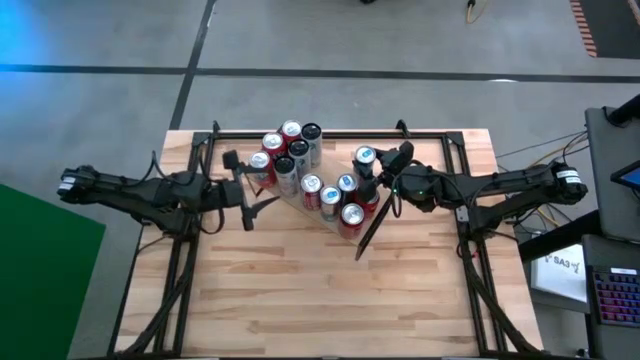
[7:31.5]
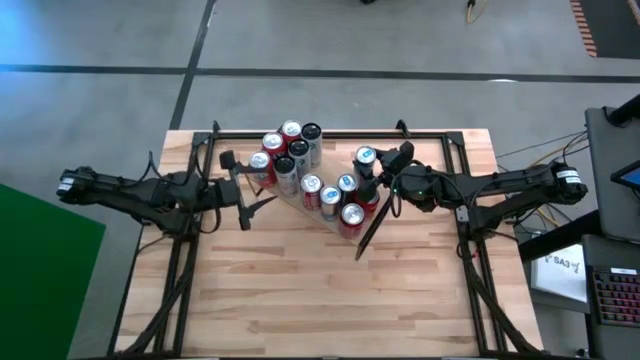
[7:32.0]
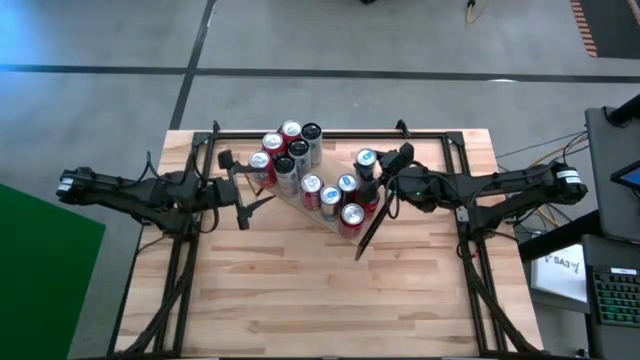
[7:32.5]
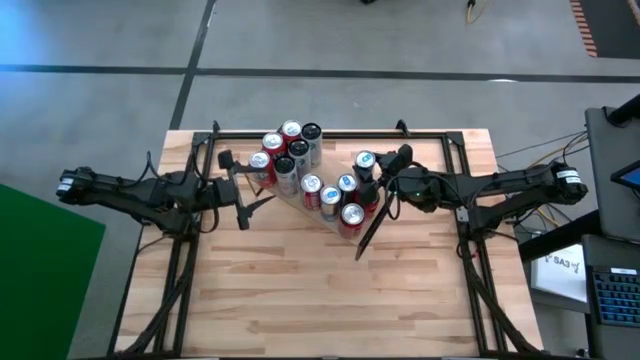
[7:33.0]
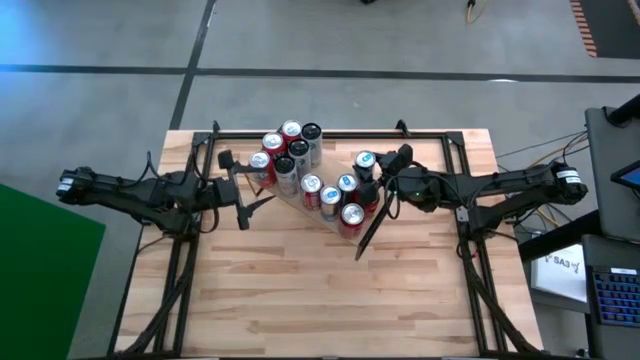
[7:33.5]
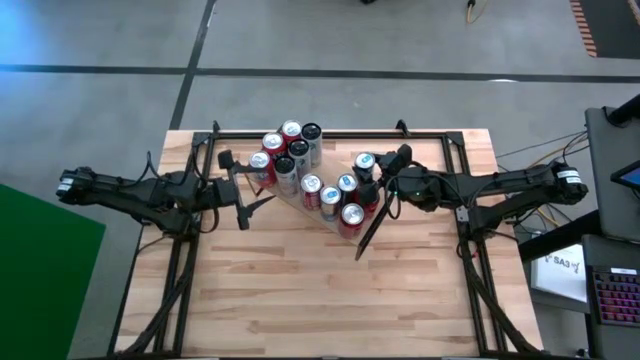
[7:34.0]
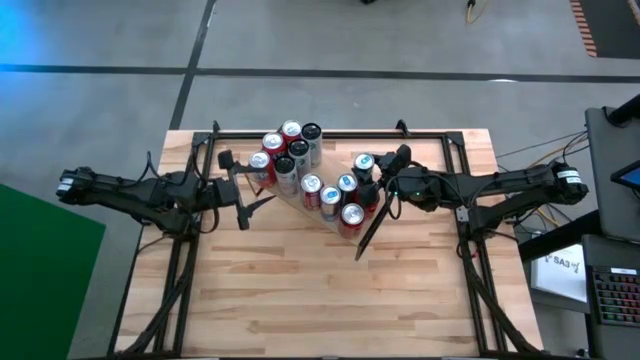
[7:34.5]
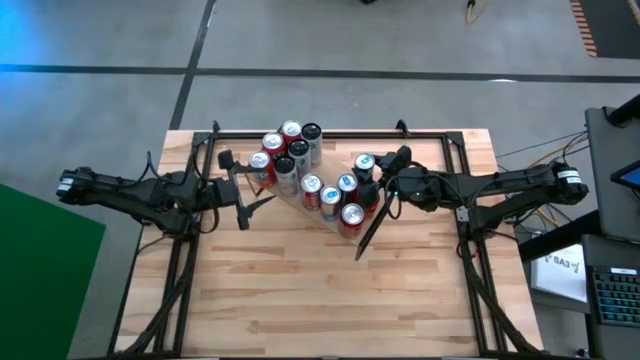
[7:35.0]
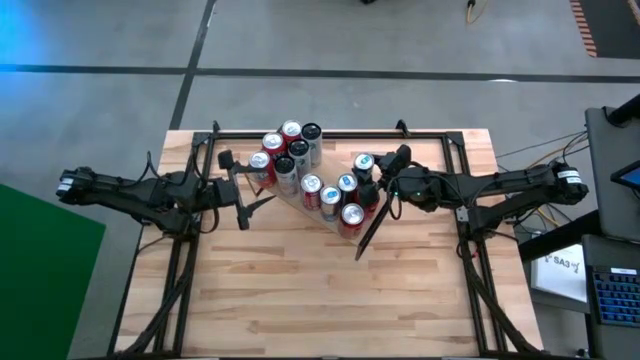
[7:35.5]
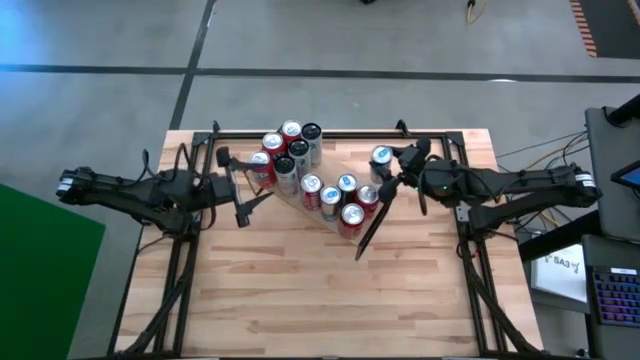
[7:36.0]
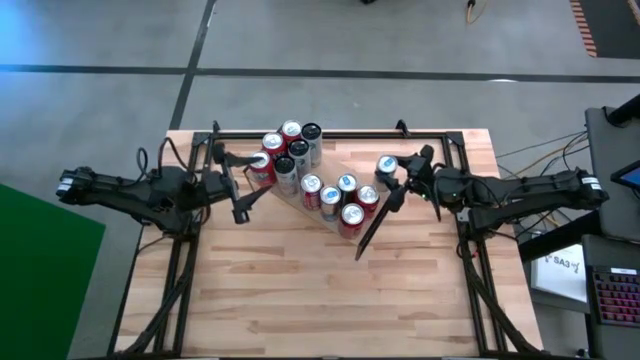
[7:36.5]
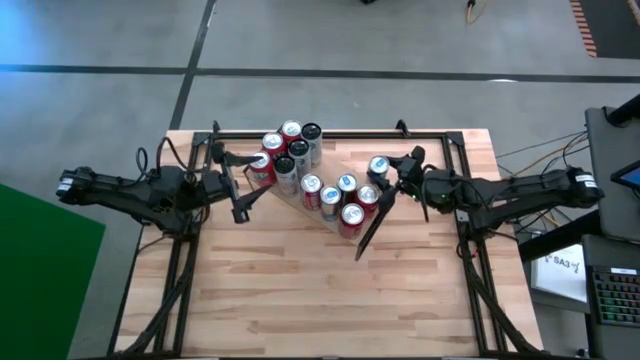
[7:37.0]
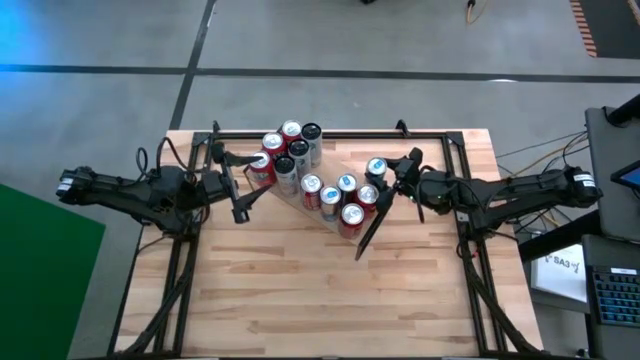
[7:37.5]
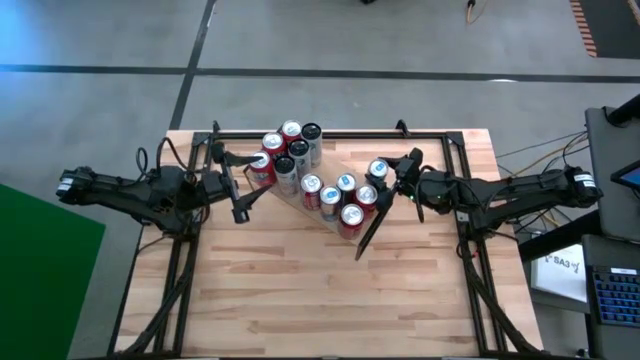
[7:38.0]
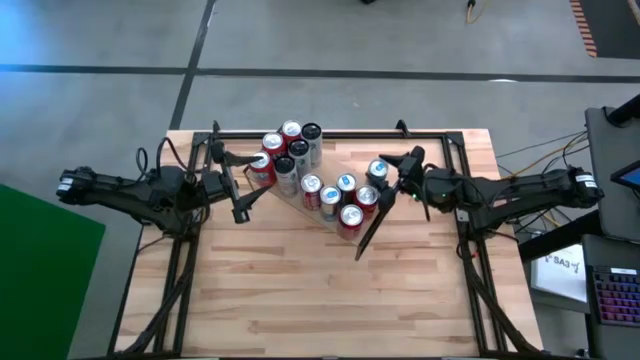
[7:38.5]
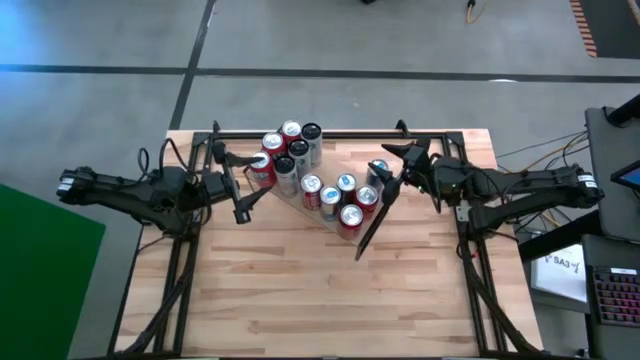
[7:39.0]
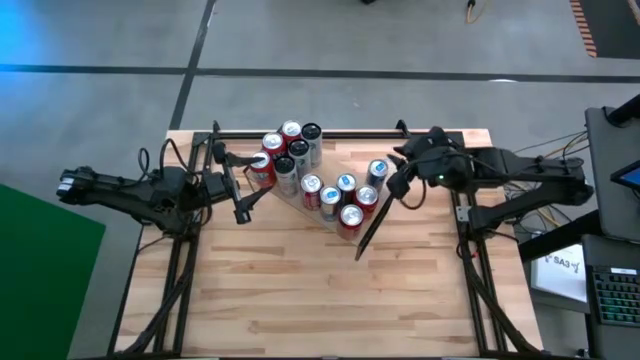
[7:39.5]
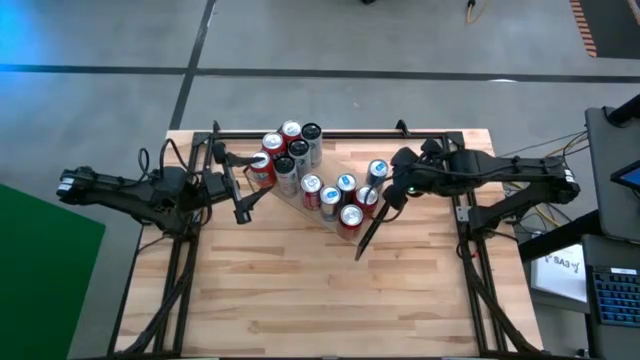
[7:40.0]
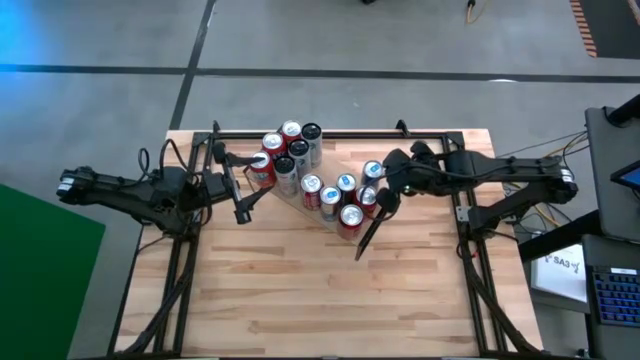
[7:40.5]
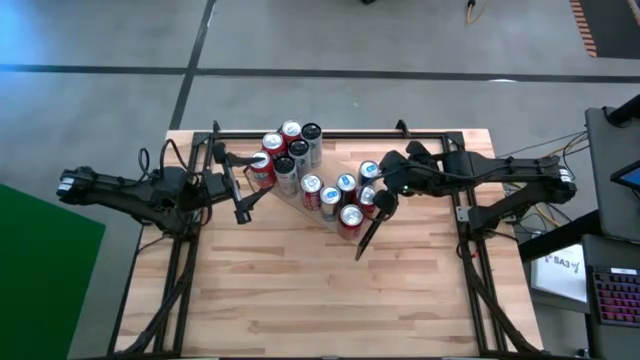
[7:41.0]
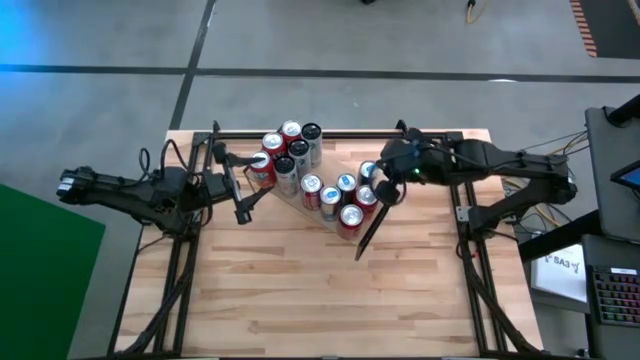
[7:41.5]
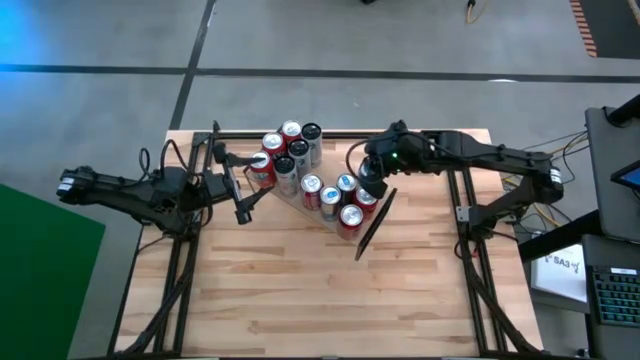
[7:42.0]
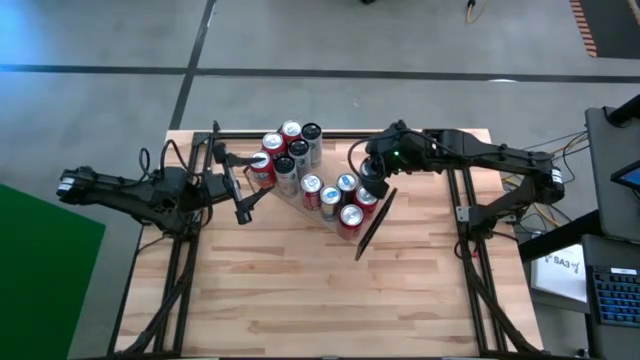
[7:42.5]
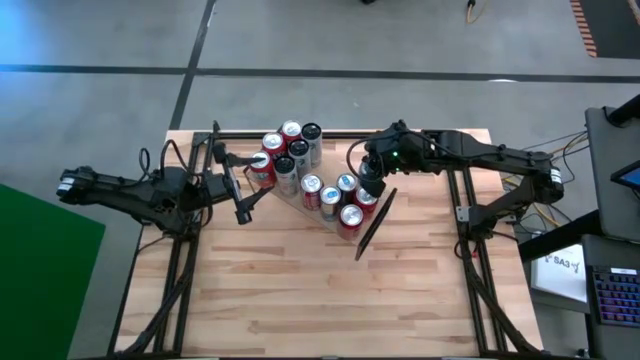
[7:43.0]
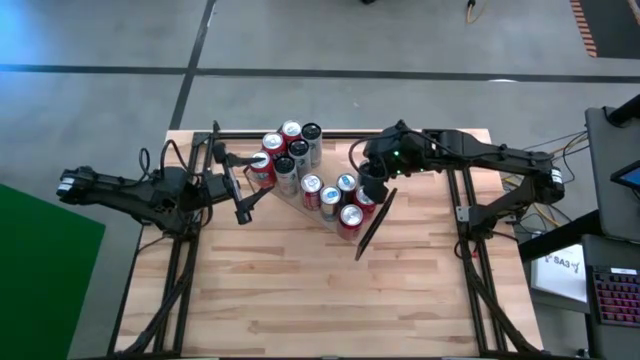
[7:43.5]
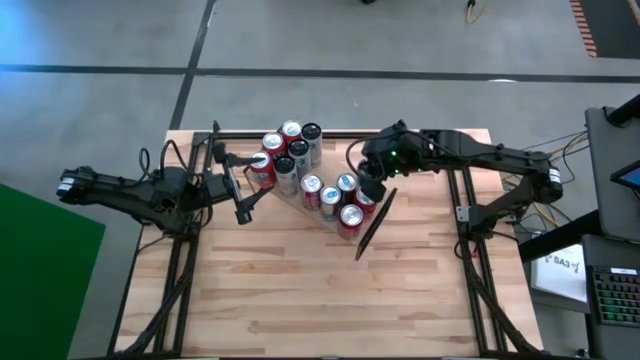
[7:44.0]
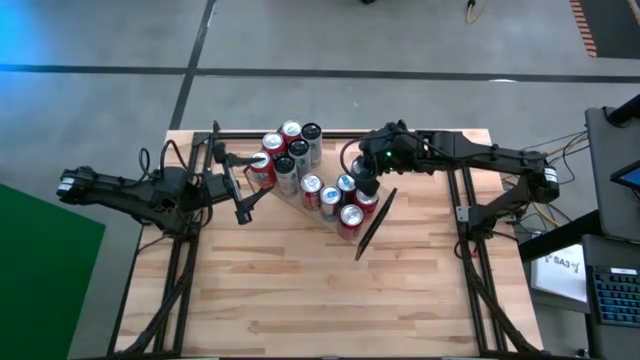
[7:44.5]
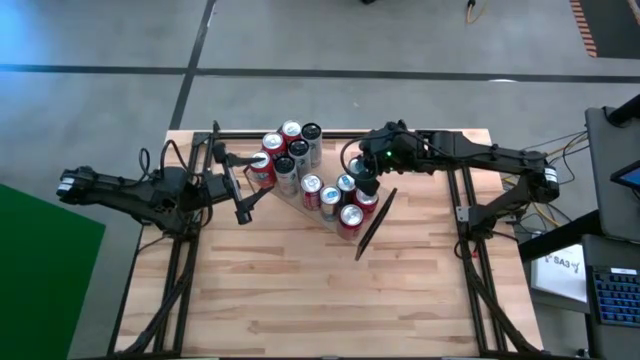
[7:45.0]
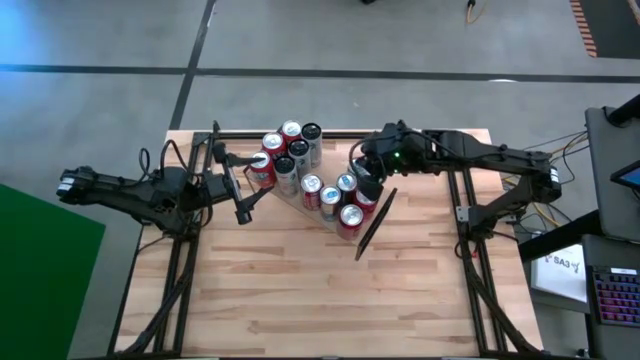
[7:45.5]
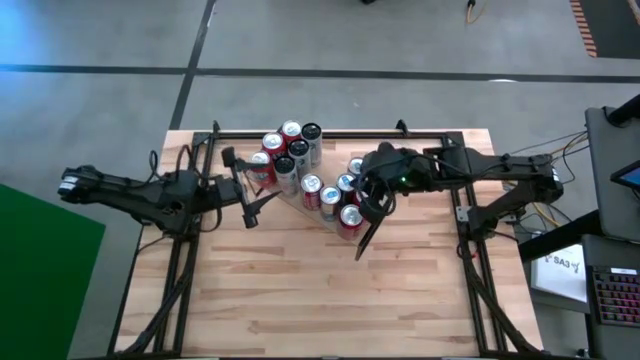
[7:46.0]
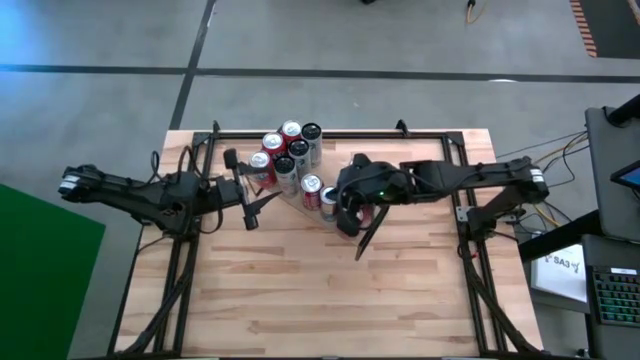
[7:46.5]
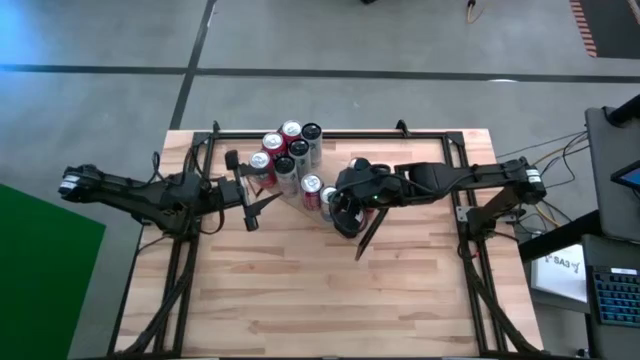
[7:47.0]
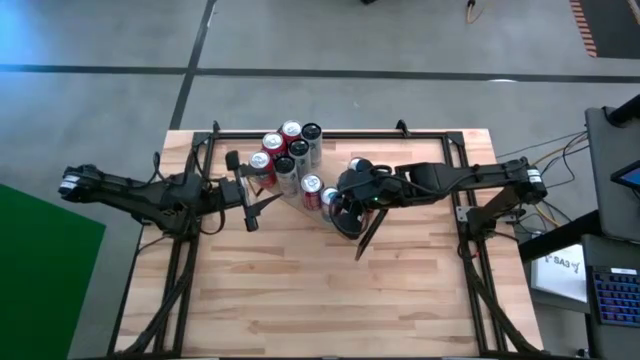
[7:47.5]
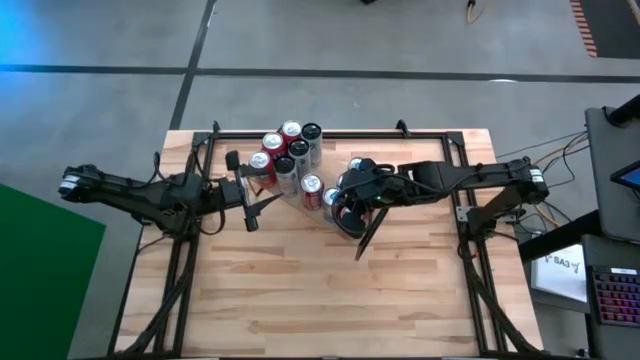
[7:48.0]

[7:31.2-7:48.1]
Task: Place canned beverage on shelf
Put the silver/blue soda can on the shelf, align with the other silver/blue soda cans

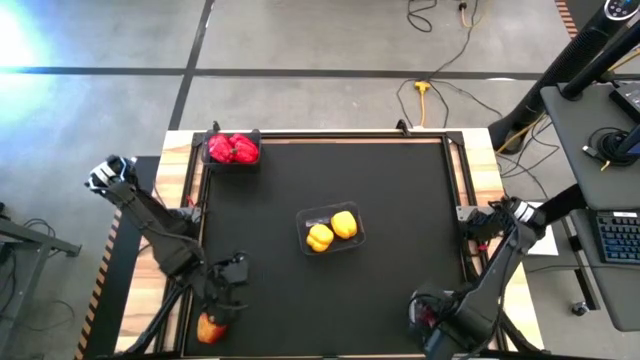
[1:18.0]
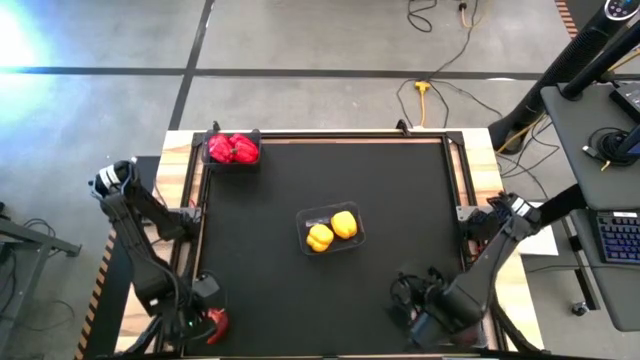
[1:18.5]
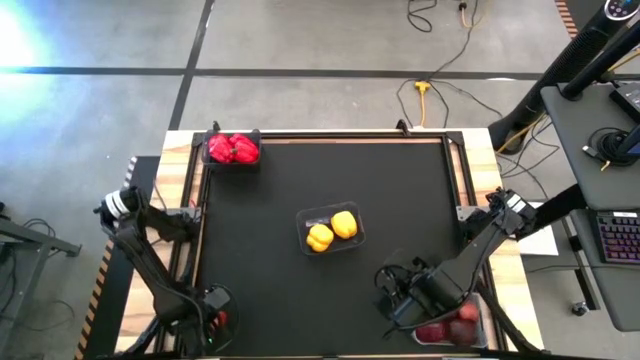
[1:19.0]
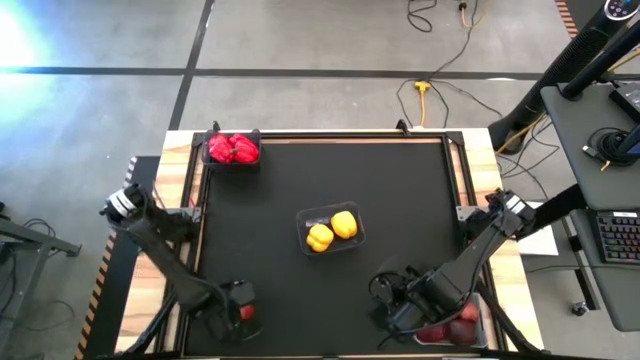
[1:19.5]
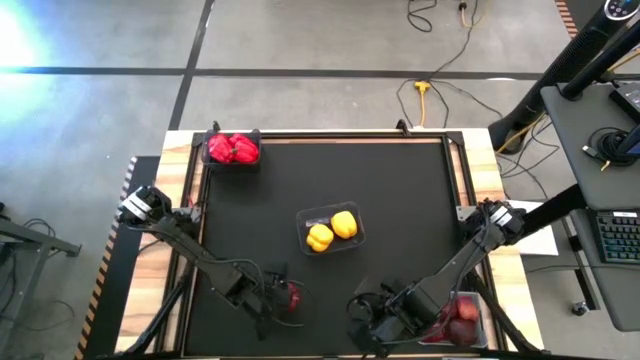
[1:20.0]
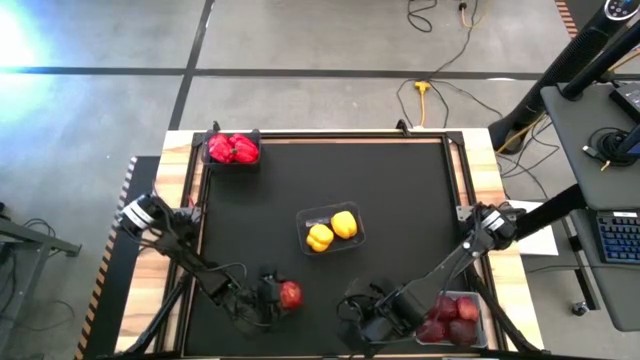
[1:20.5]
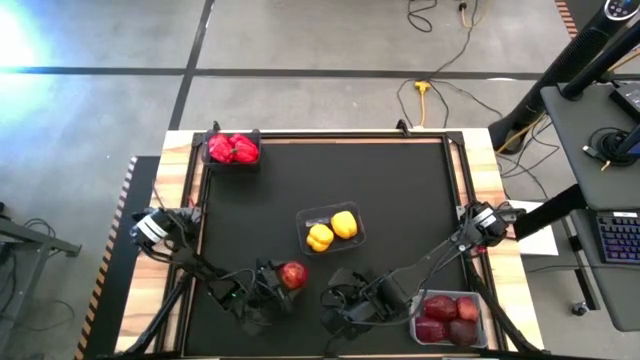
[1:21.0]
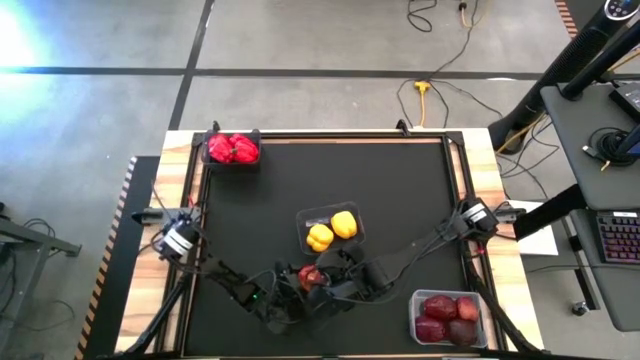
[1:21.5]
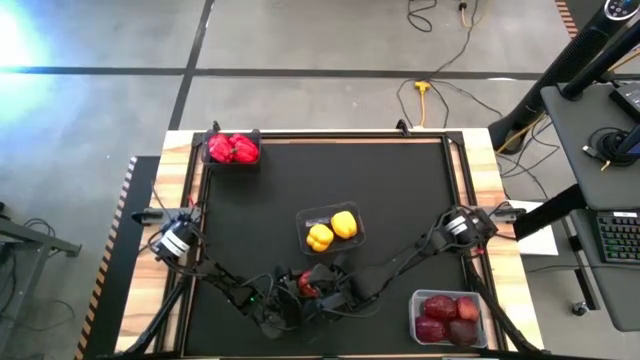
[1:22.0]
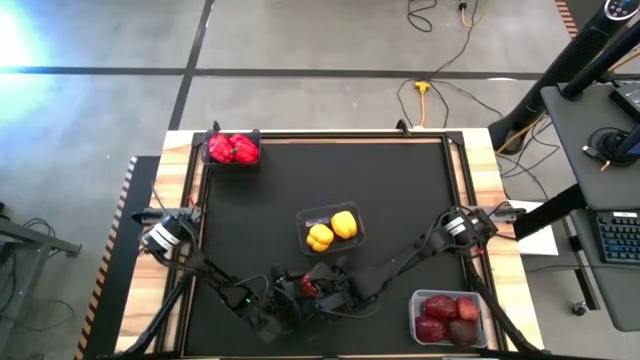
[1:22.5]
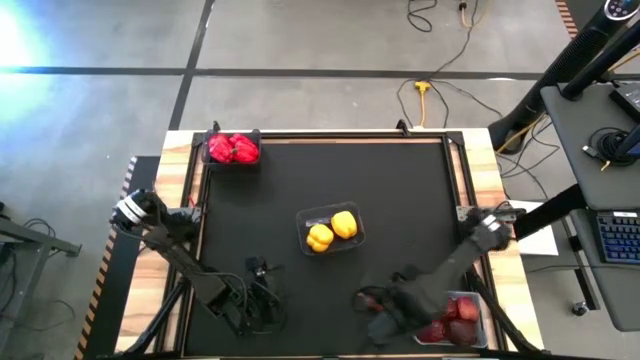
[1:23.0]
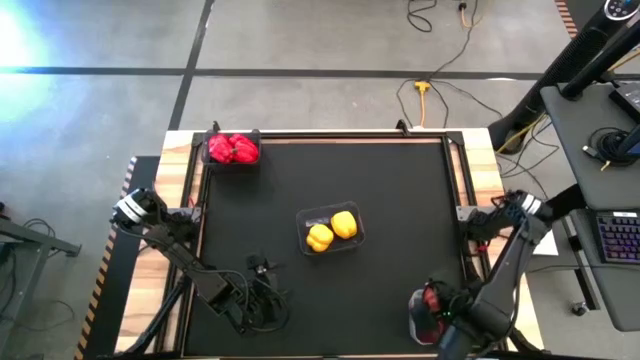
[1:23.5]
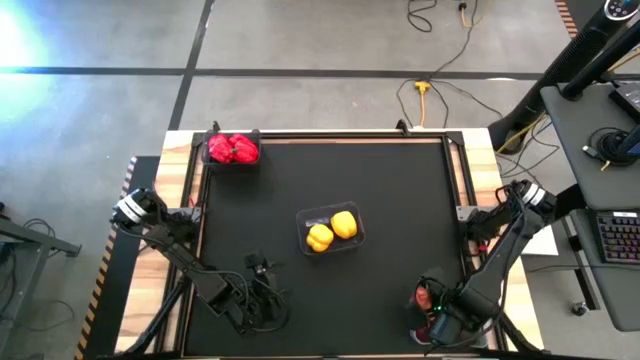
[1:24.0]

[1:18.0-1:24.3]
Task: Sort produce into baskets
Put the red apple into the transparent bin
